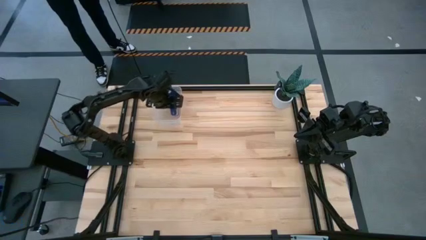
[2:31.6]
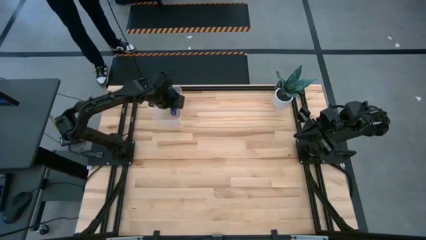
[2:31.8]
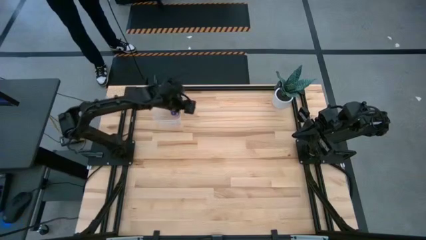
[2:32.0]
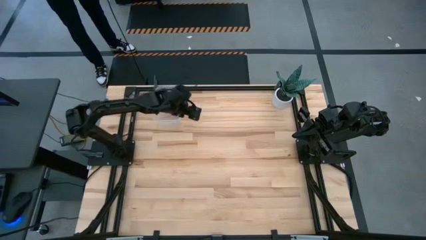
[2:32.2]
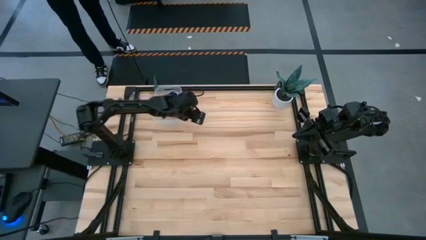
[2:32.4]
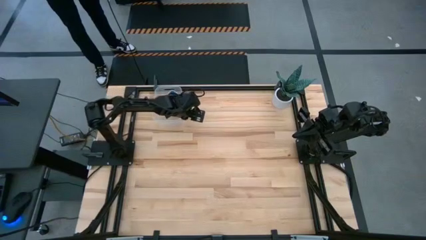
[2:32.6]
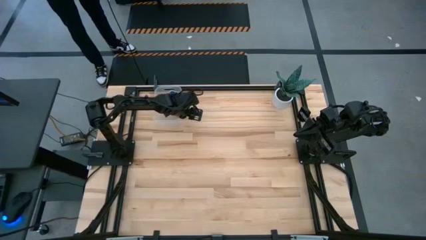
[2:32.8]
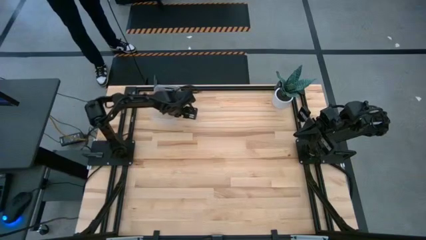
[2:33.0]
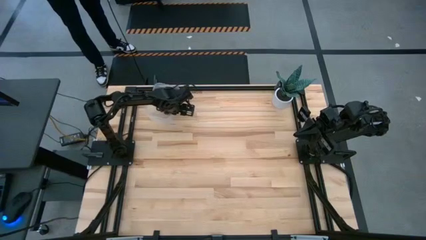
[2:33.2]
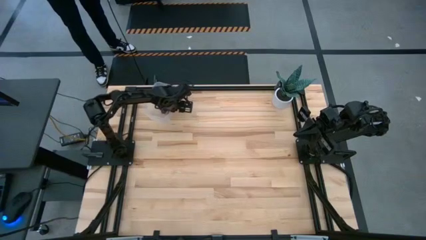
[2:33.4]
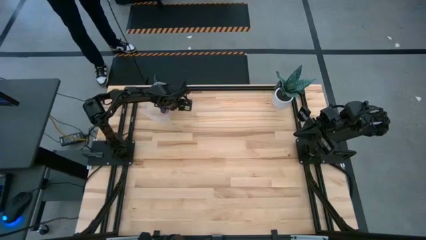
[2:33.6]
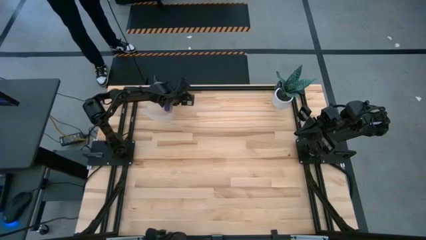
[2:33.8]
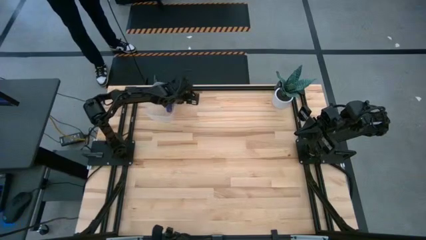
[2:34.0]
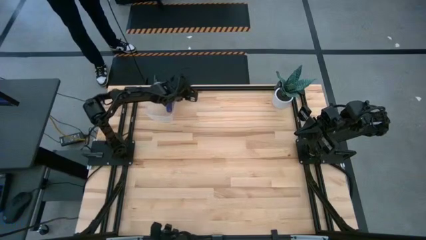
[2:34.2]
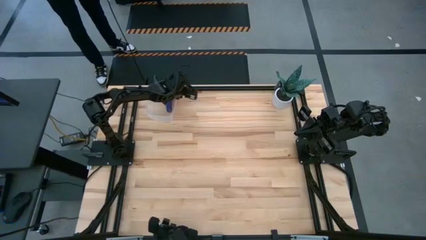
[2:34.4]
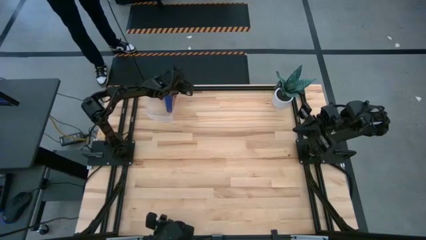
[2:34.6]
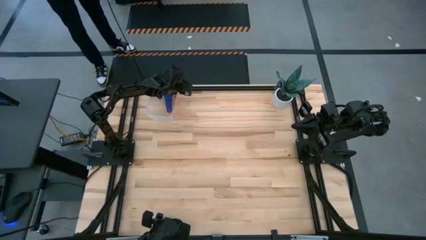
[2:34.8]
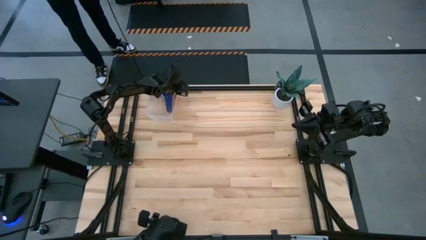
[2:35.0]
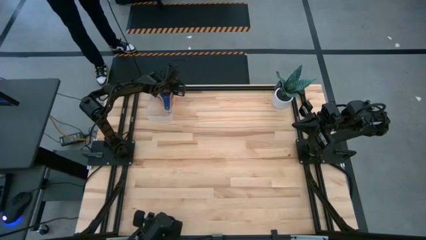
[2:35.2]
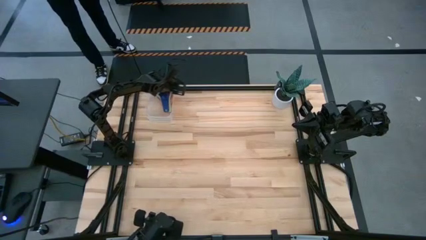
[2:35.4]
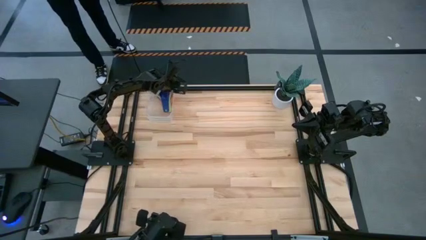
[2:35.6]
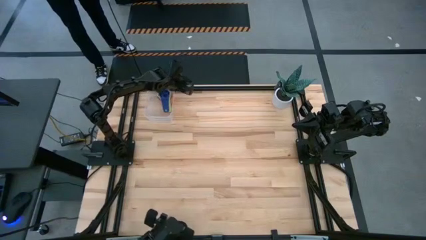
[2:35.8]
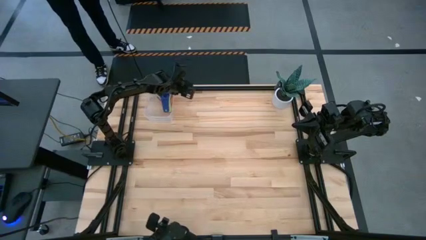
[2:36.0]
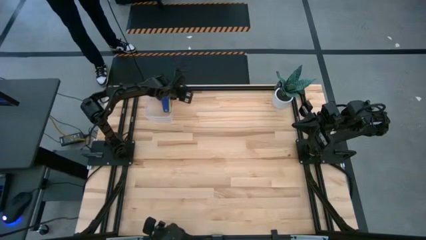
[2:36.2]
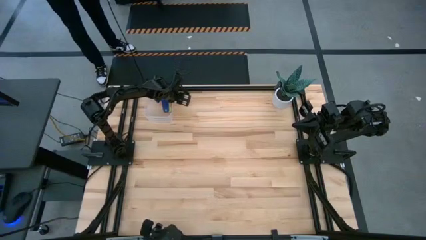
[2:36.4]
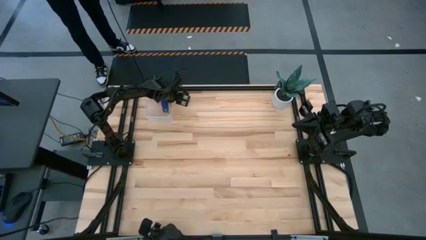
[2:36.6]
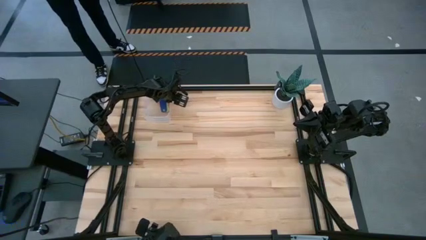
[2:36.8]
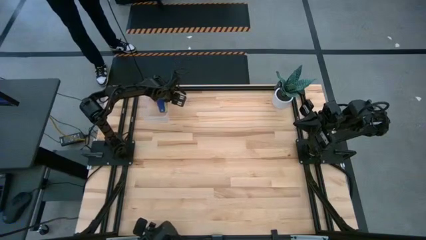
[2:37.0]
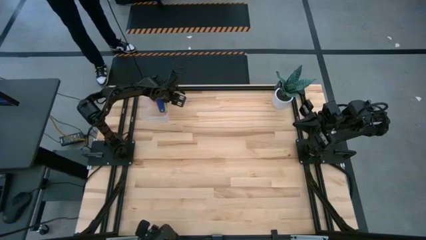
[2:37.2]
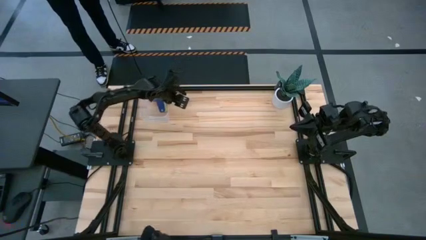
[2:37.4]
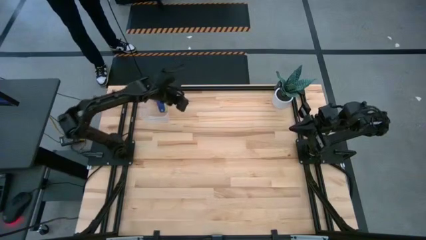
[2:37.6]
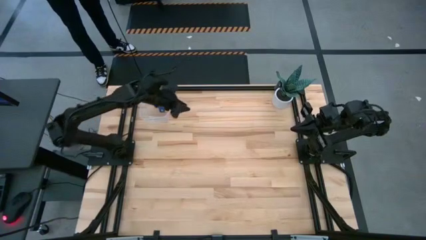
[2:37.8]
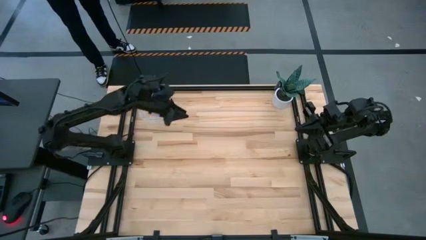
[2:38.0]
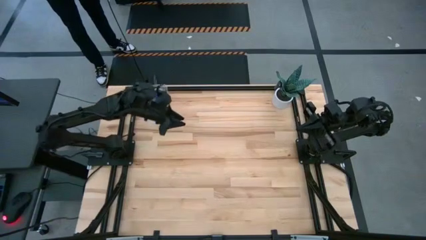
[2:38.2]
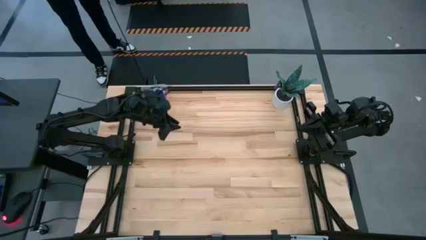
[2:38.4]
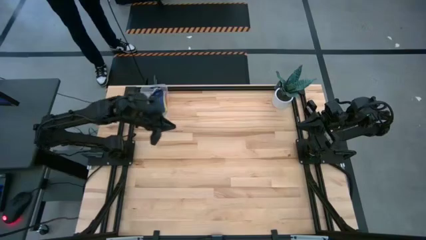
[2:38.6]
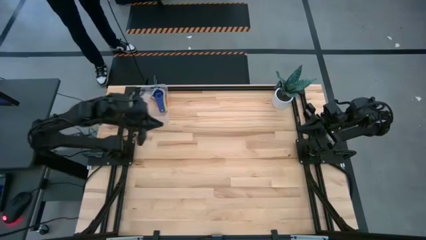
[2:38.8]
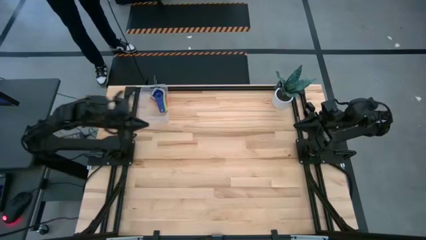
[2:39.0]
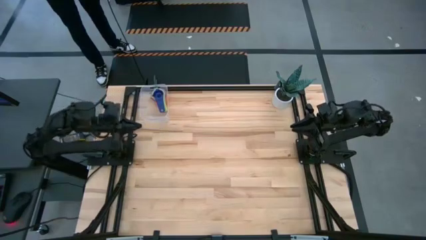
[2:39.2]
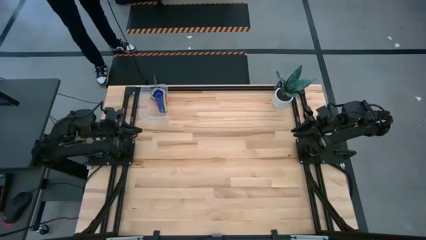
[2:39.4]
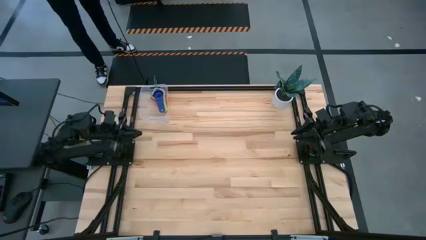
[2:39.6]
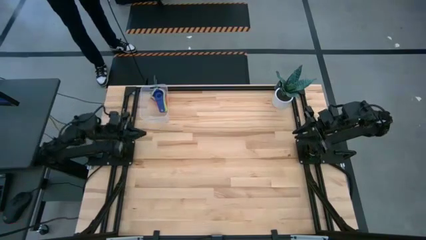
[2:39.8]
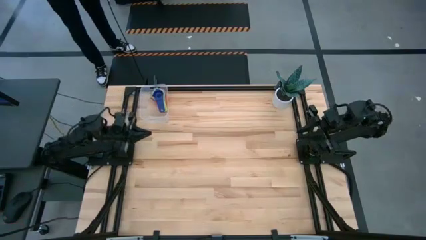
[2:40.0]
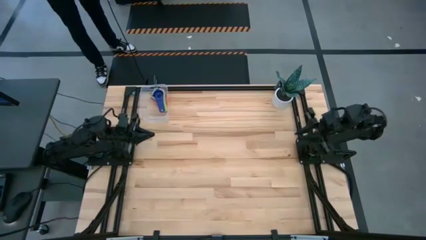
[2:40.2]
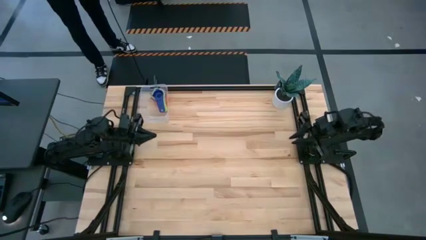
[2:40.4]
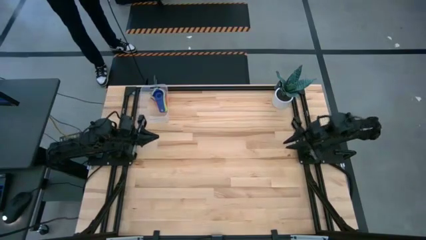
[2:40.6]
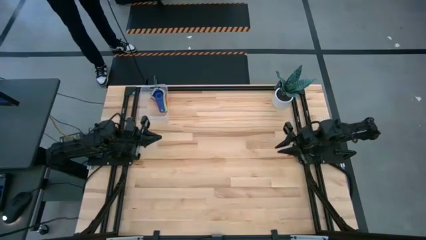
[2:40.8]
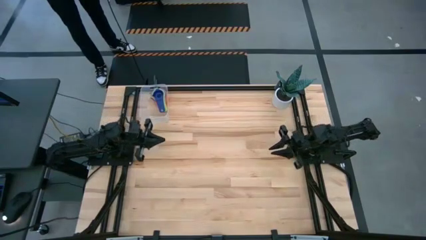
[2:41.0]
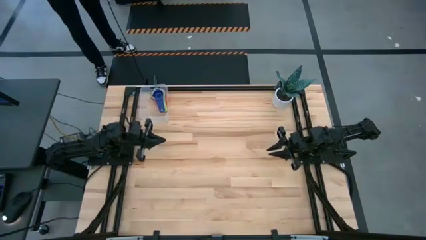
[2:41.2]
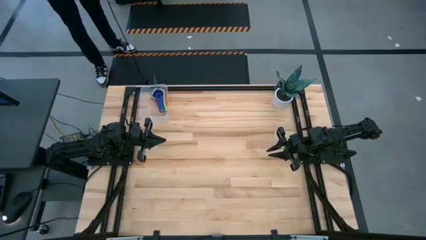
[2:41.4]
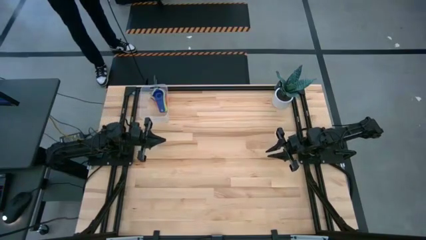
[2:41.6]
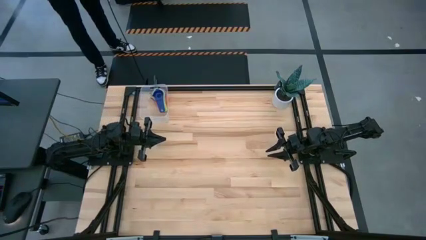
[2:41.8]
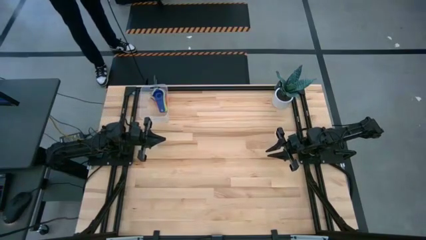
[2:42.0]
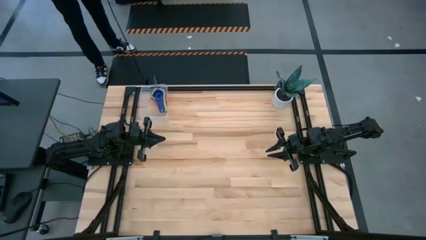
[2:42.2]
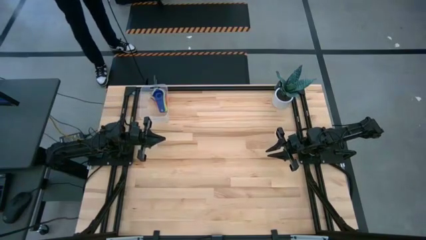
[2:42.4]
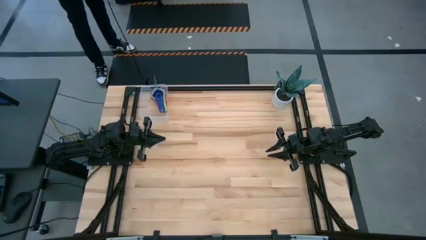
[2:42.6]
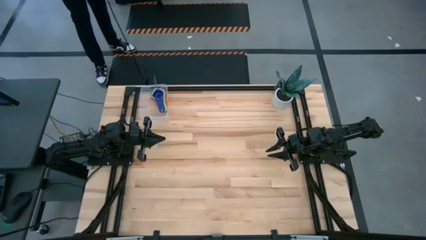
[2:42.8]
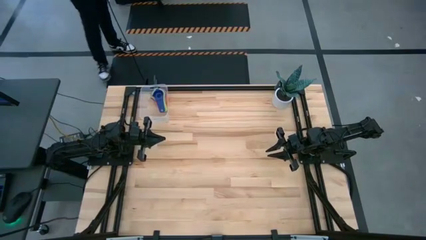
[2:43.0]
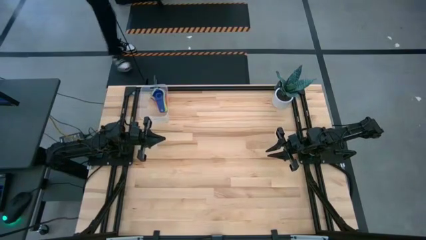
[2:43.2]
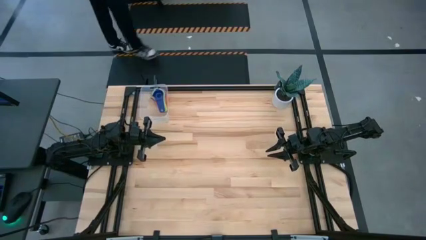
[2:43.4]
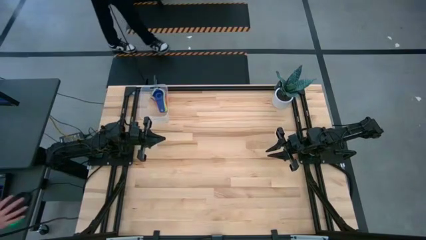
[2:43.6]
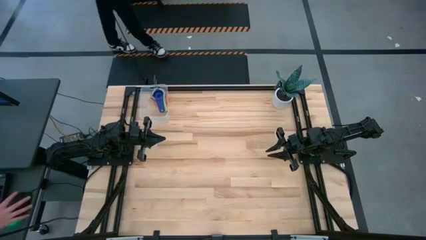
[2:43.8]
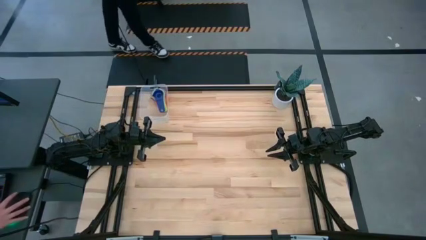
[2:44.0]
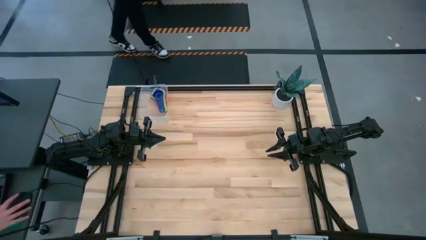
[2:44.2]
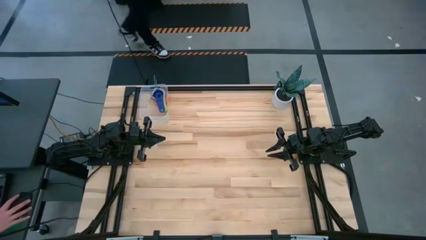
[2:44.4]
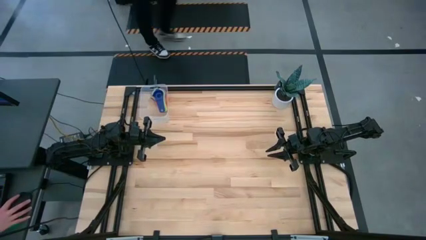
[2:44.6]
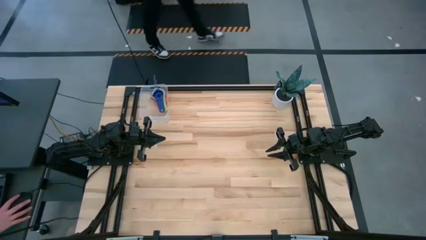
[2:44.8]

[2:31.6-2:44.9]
Task: Nest measuring cups in basket
Return to Home Position

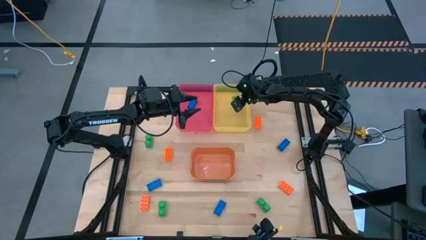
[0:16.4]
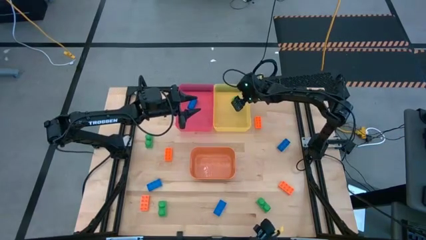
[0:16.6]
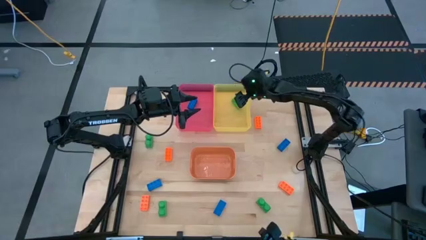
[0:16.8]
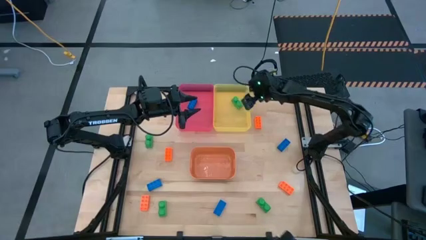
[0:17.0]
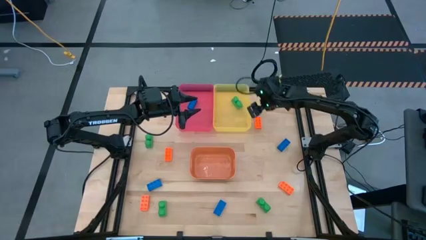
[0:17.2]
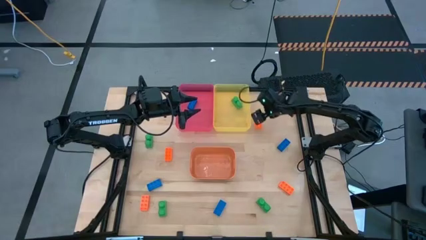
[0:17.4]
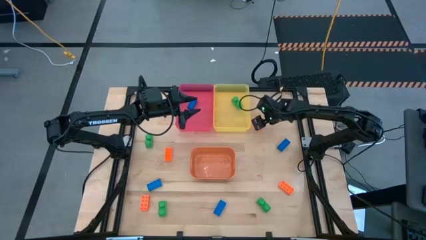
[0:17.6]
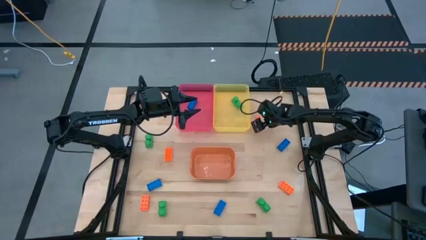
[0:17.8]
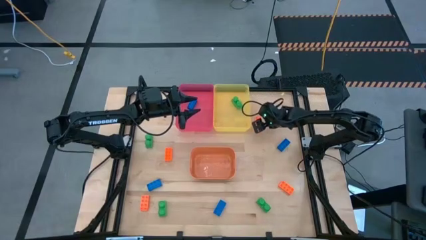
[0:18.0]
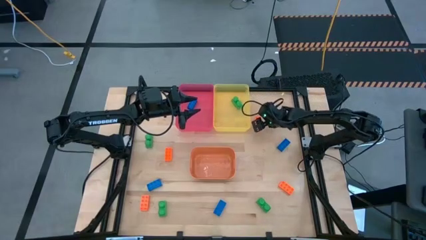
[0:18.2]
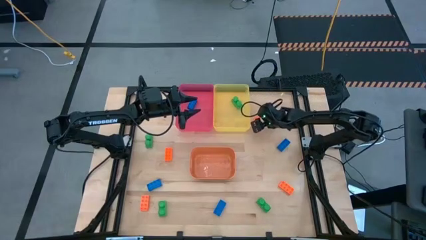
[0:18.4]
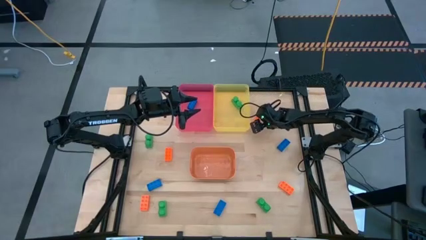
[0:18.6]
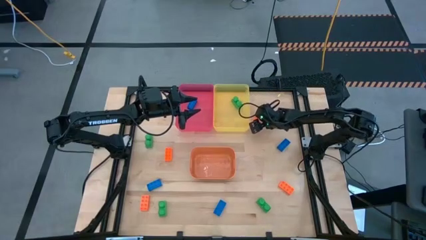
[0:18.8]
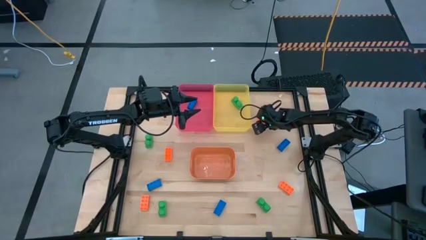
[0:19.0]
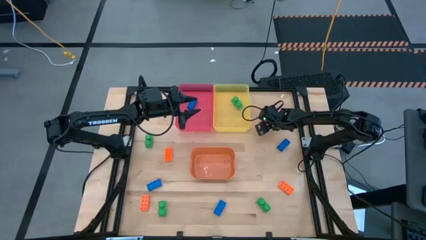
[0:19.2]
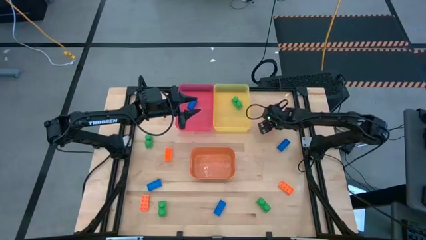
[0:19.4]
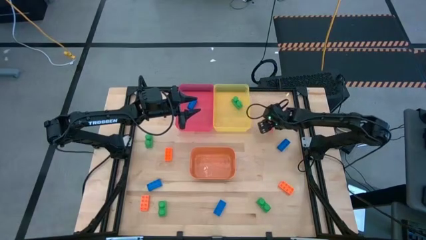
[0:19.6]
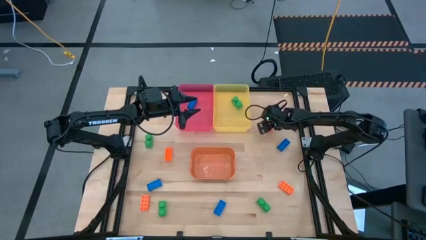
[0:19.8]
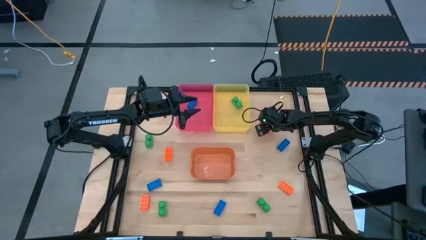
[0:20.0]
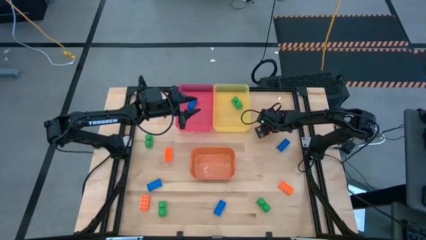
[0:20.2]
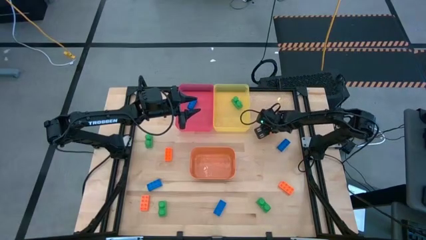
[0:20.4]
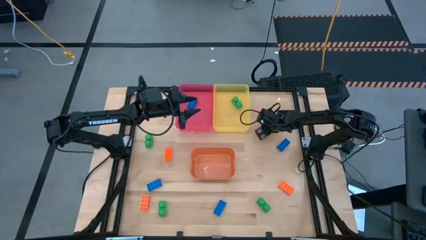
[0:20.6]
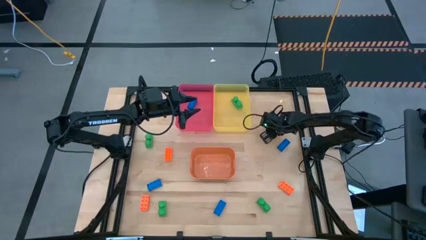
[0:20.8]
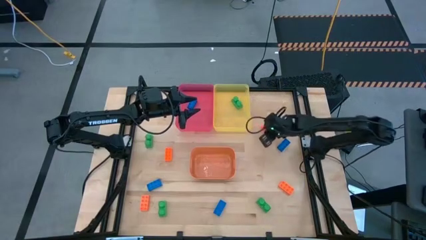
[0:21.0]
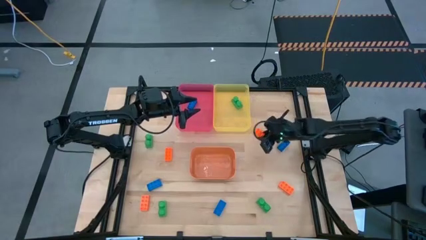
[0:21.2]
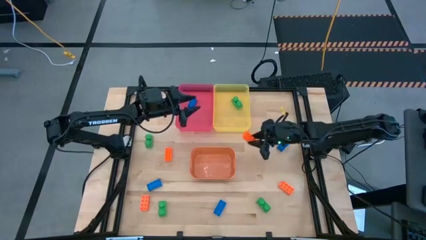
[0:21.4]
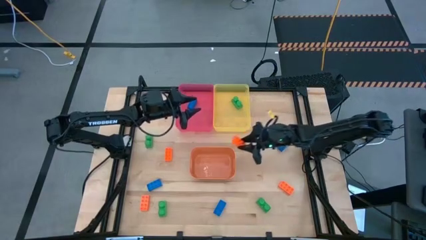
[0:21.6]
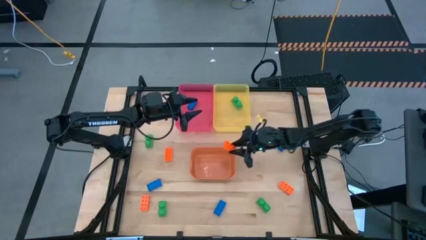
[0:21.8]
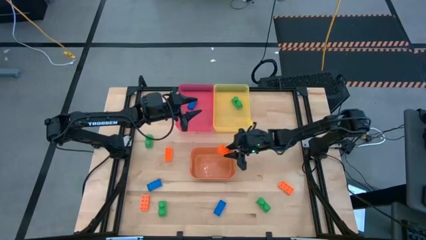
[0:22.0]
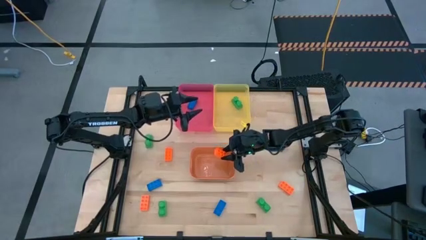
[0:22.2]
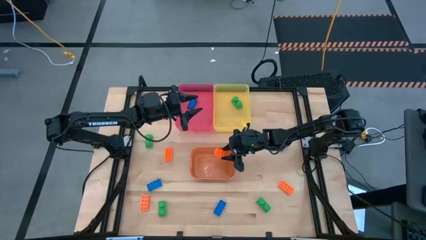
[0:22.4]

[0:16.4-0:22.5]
Task: Sort & place blocks by color
Put the orange game piece into the orange bin
